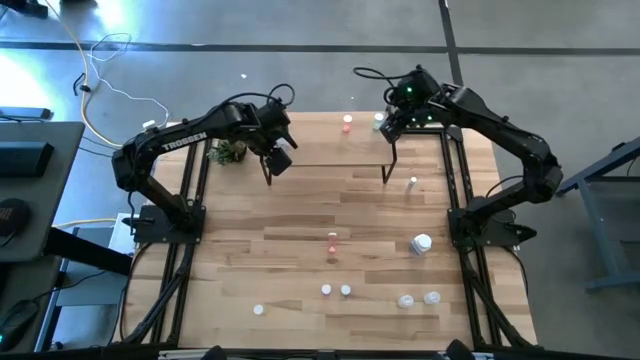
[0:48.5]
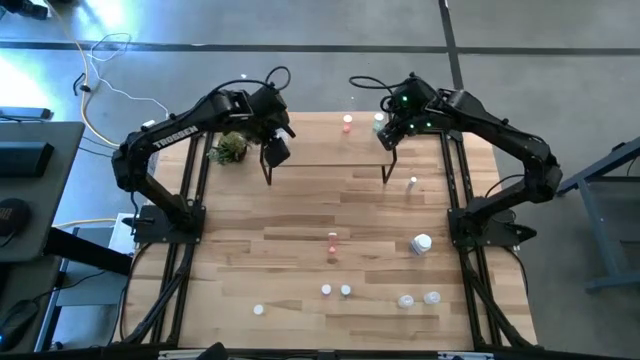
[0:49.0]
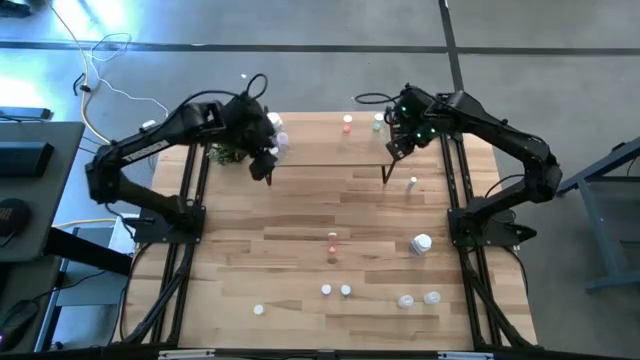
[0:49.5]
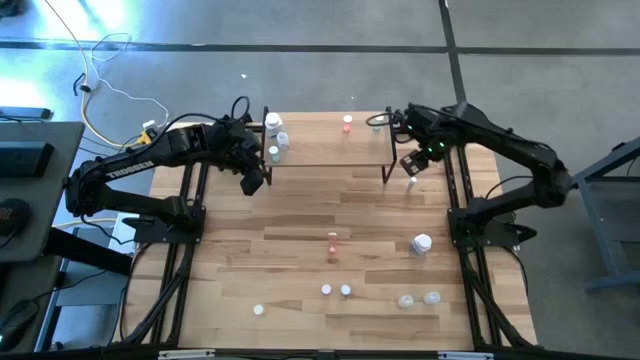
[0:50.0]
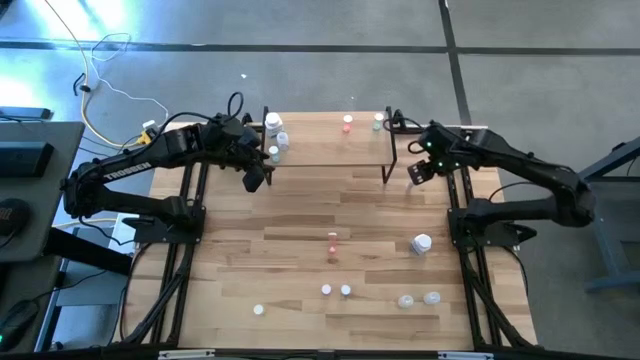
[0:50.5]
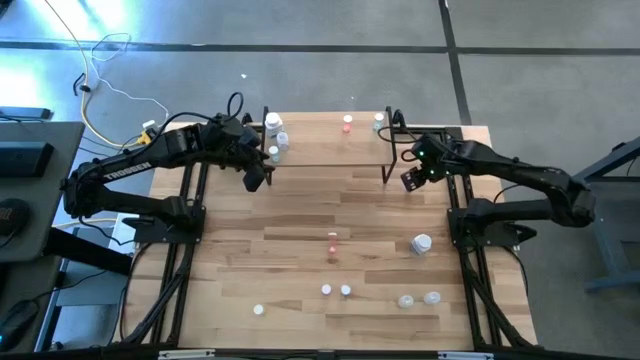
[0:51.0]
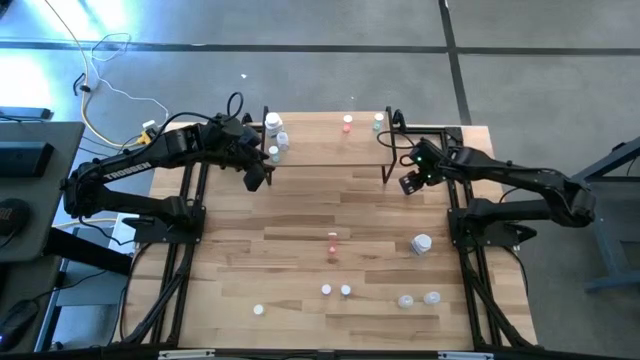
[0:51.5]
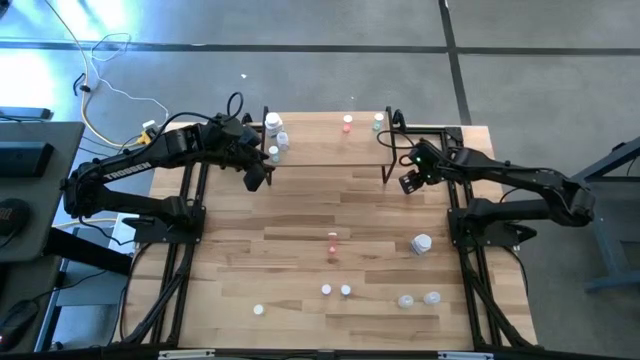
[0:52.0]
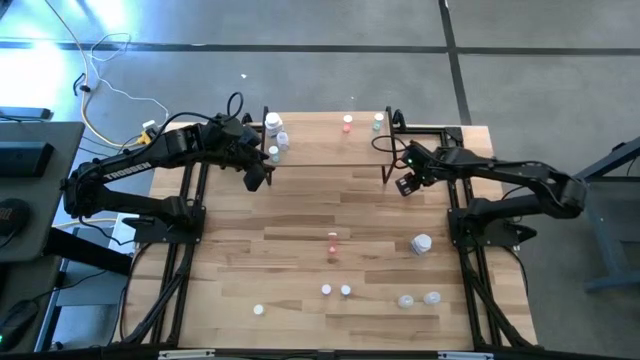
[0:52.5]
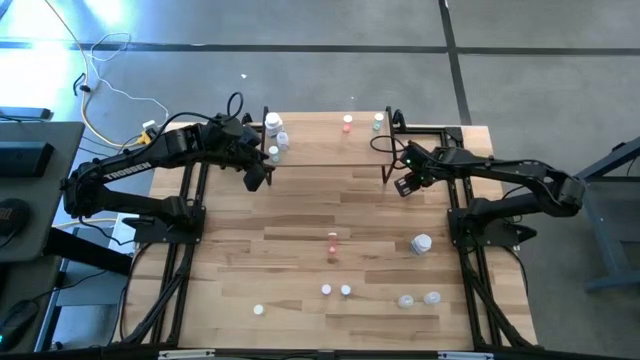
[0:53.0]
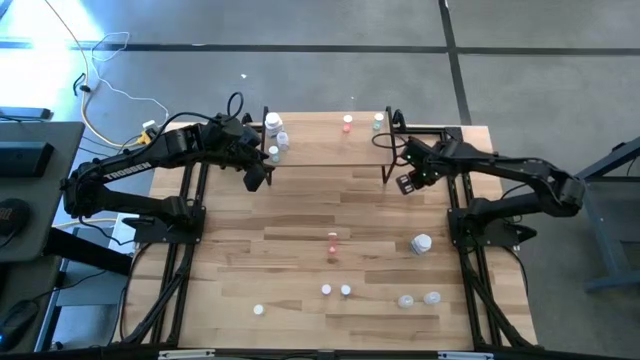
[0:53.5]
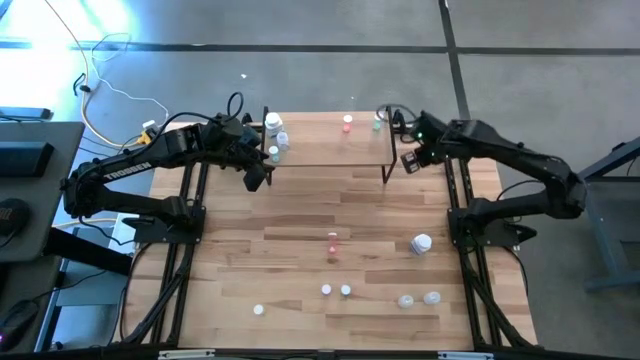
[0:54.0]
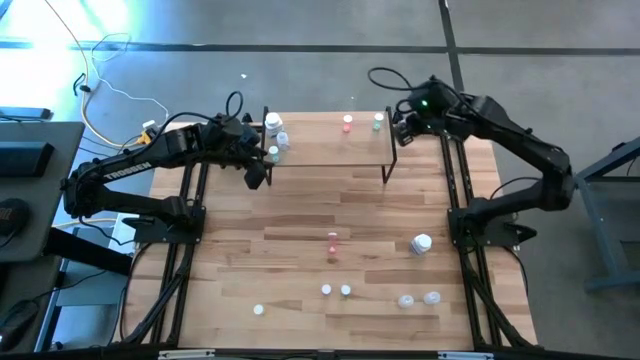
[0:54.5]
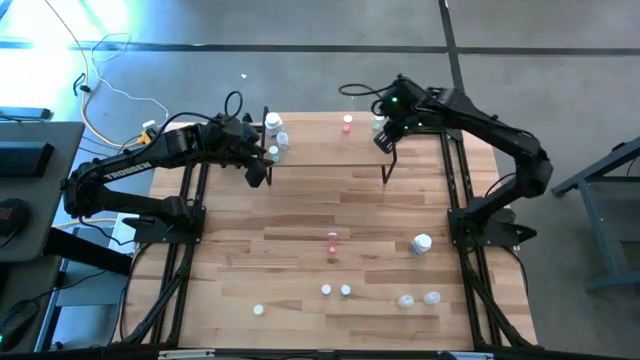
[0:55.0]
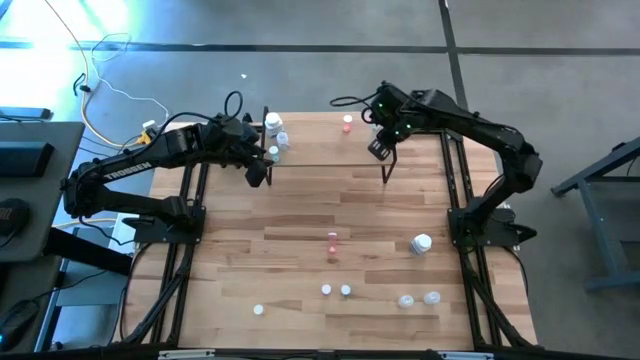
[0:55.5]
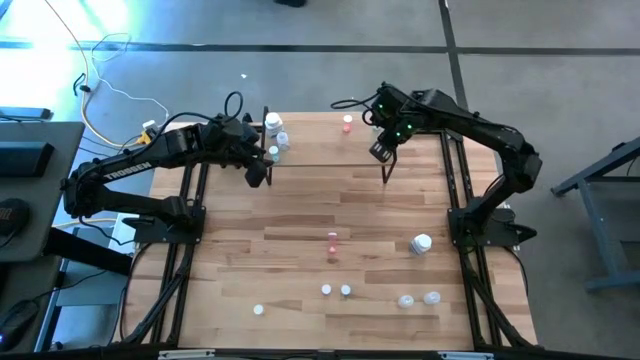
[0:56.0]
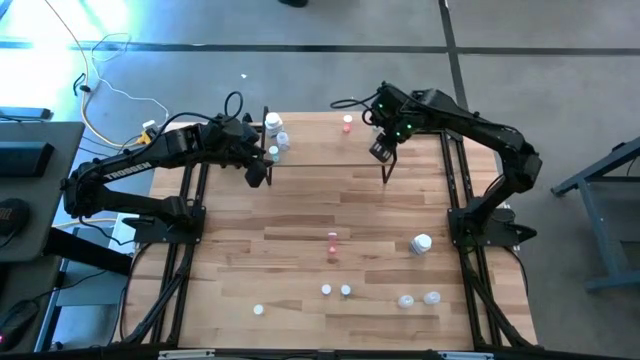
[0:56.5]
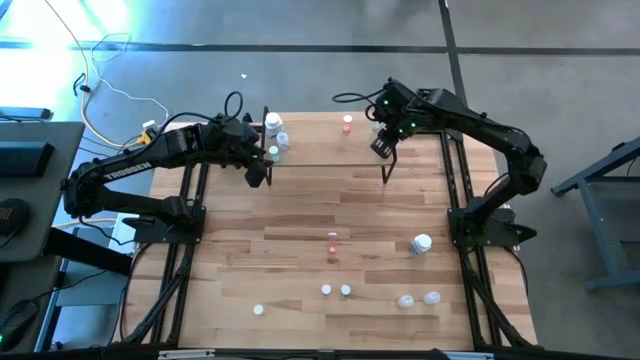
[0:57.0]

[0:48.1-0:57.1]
Task: Pick and place medicine bottles onto shelf by color
Put the top small white pill bottle on the shelf

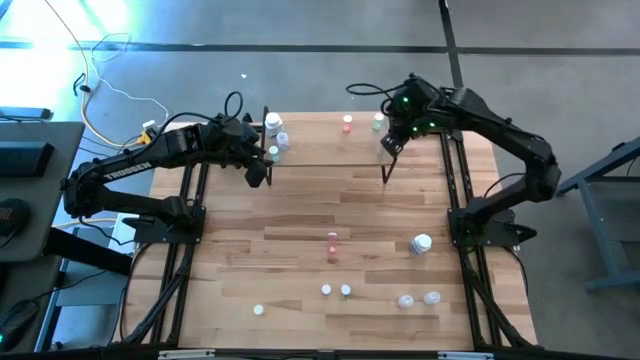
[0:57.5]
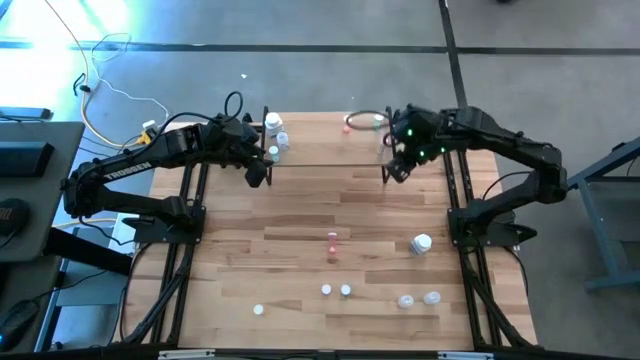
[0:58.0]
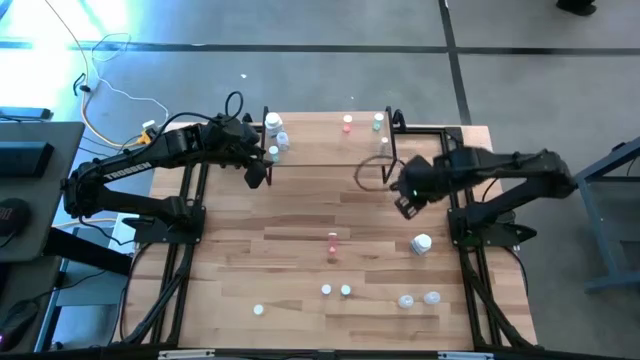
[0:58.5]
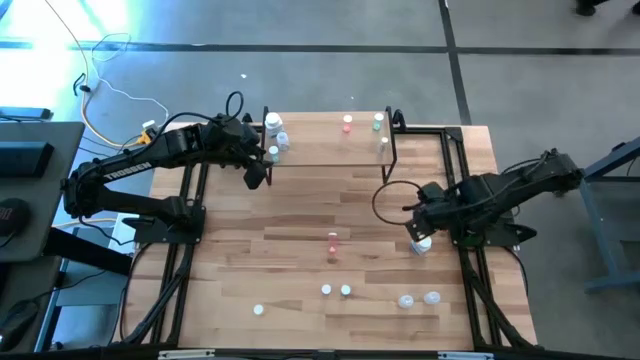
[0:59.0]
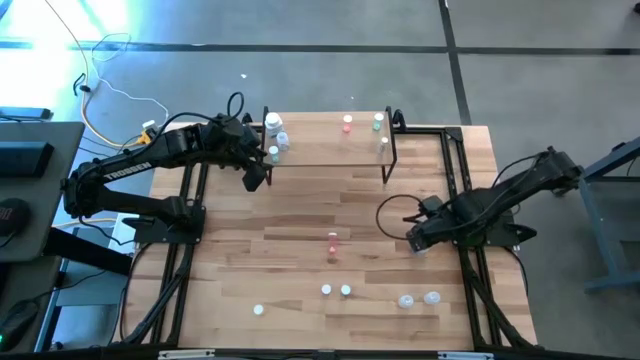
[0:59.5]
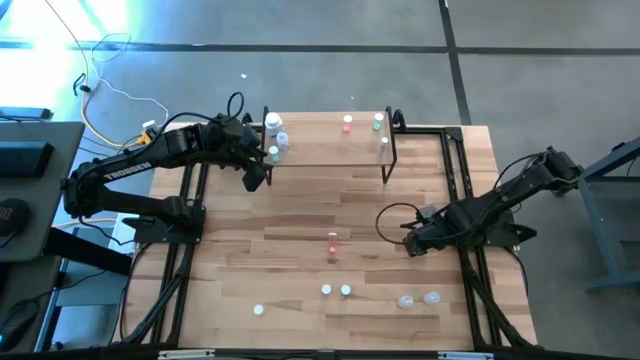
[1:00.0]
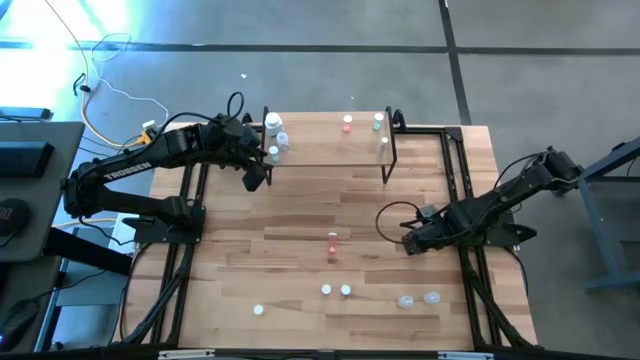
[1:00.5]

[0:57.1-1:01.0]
Put the large white blue pill bottle on the shelf

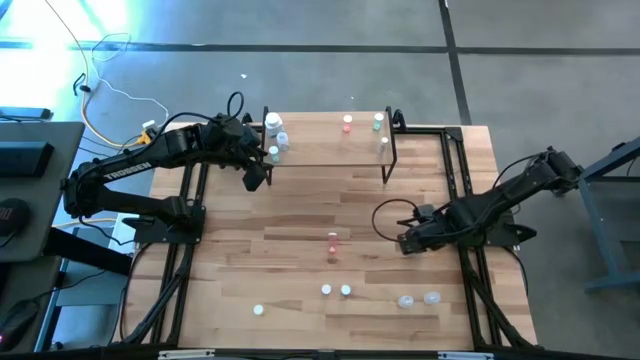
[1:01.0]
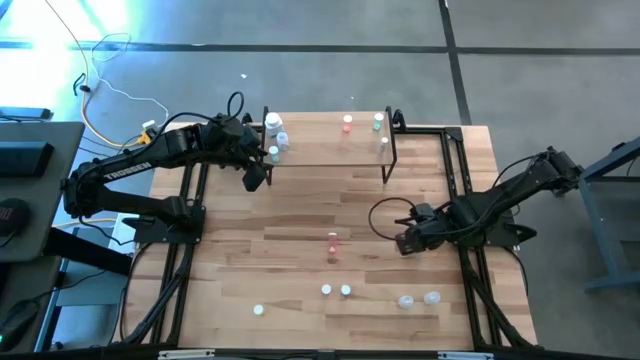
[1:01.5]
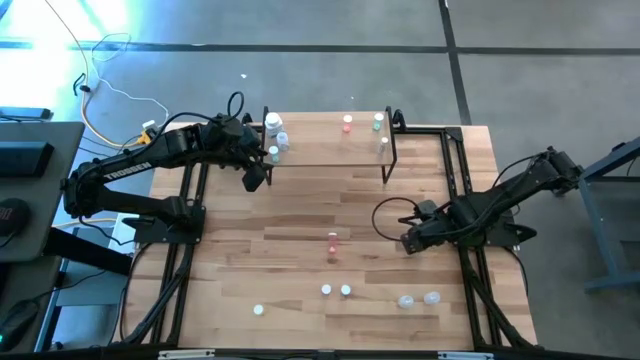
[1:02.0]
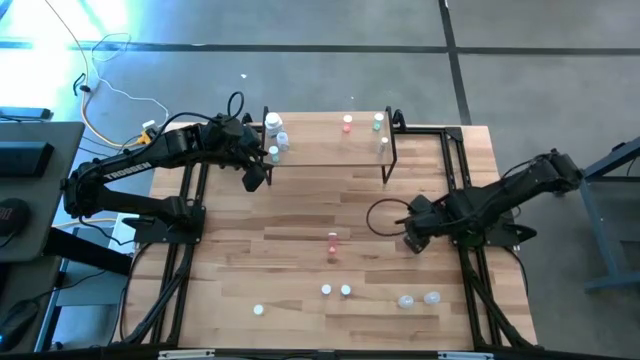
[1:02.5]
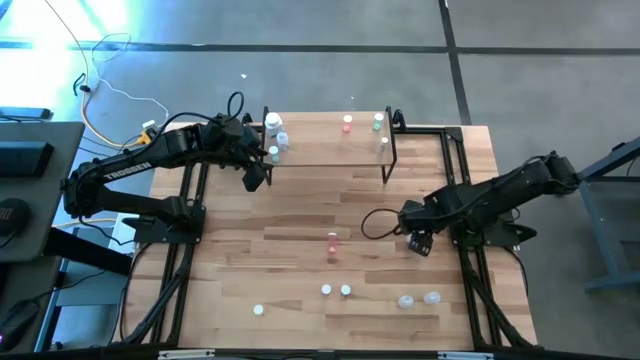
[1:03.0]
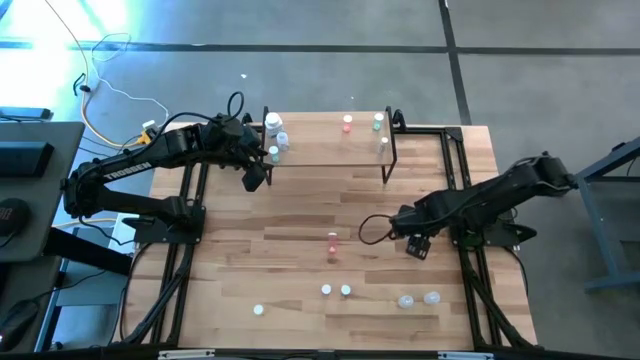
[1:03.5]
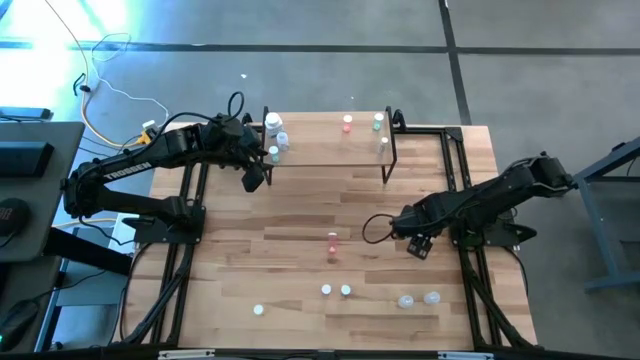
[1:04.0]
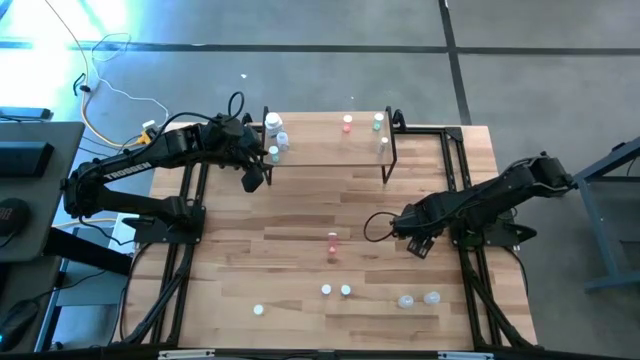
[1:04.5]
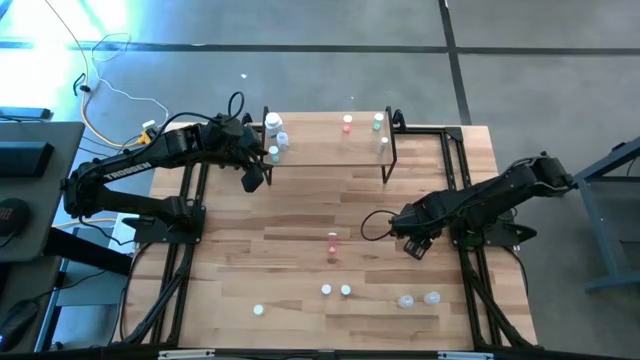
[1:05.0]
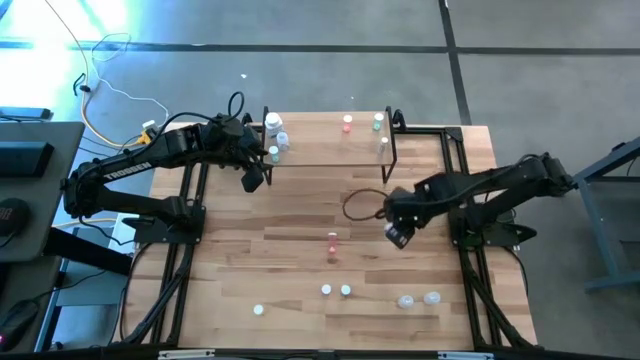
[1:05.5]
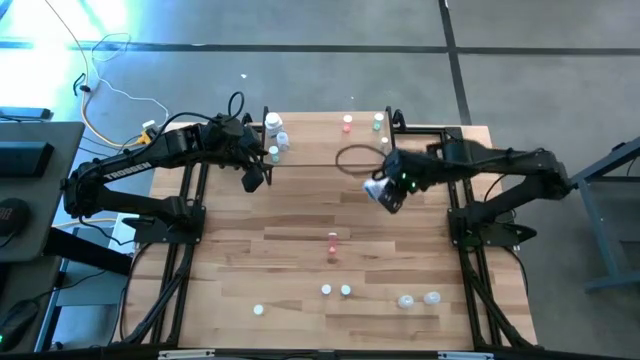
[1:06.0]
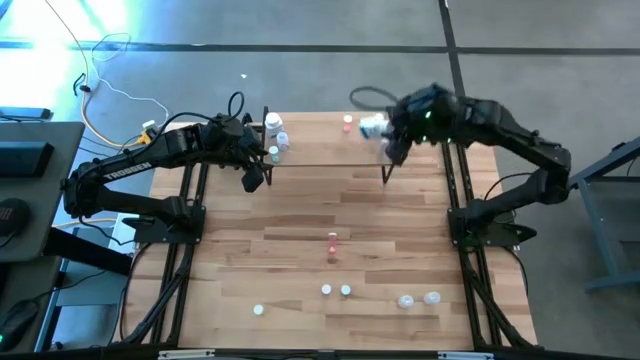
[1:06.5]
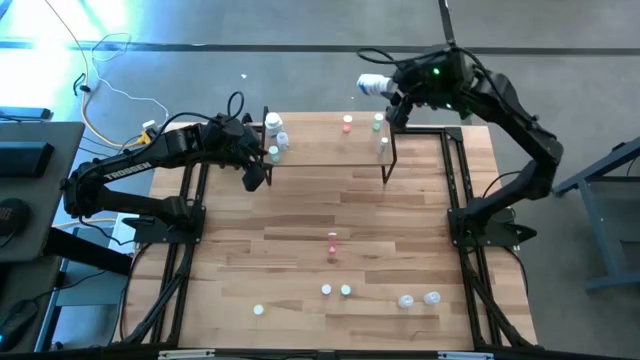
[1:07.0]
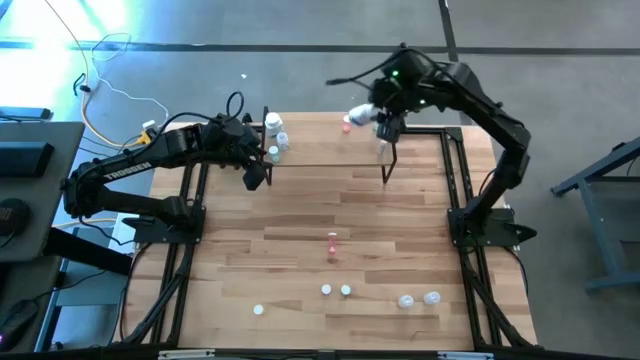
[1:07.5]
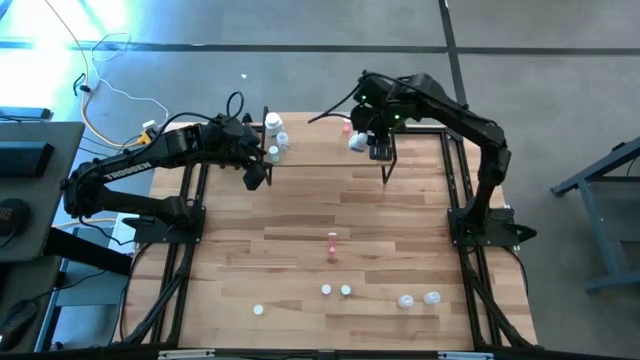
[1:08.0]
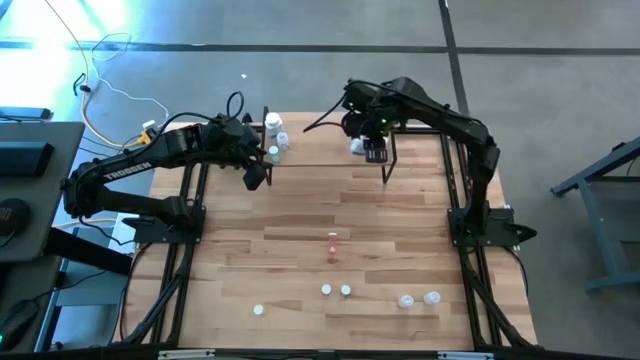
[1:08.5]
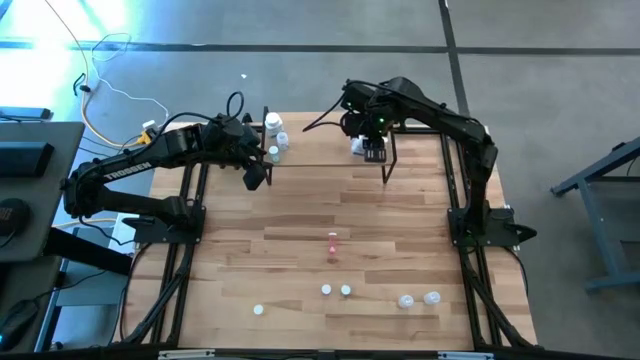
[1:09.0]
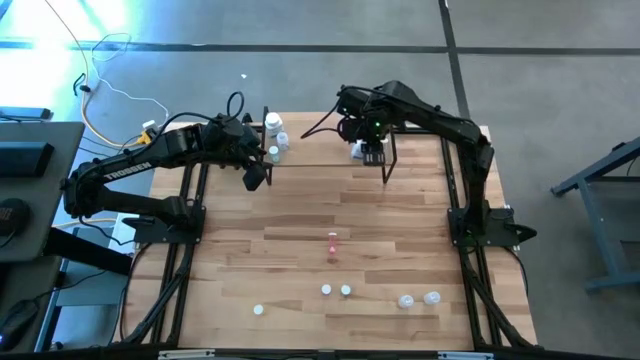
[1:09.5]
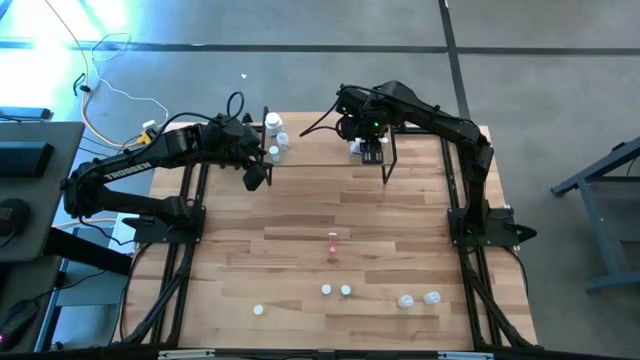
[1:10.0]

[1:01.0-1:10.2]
Put the large white blue pill bottle on the shelf
